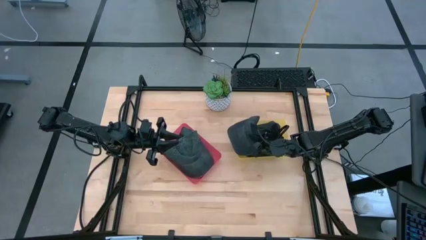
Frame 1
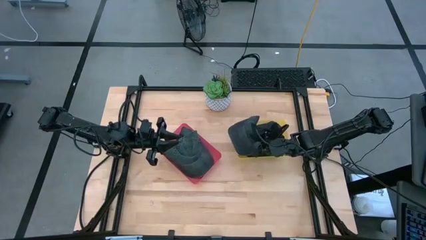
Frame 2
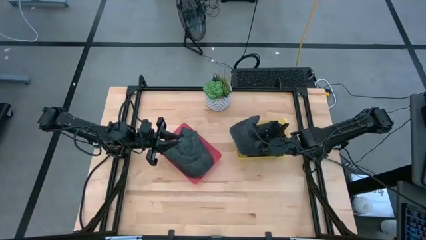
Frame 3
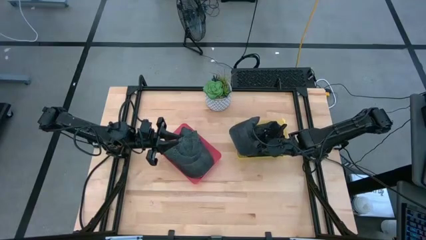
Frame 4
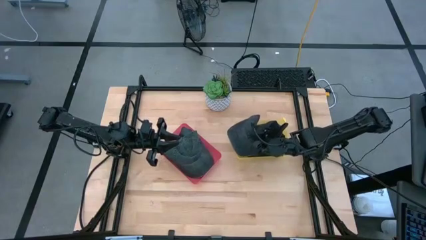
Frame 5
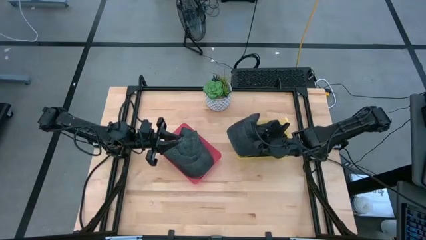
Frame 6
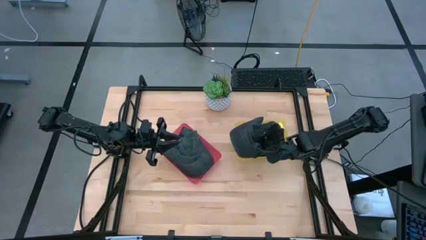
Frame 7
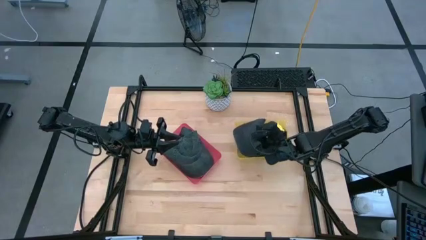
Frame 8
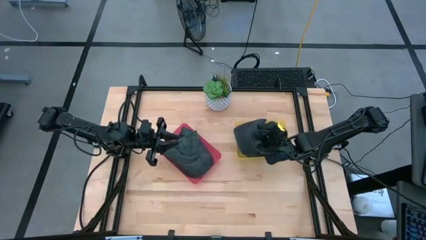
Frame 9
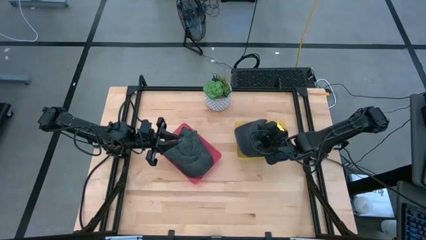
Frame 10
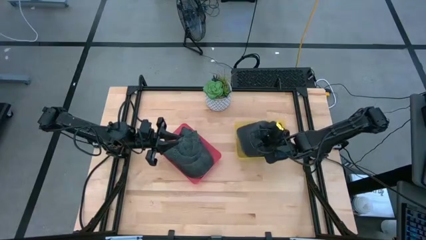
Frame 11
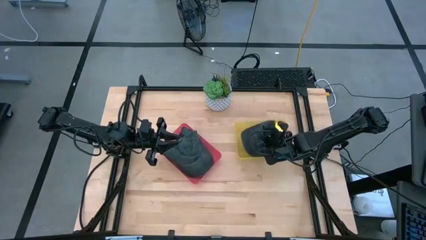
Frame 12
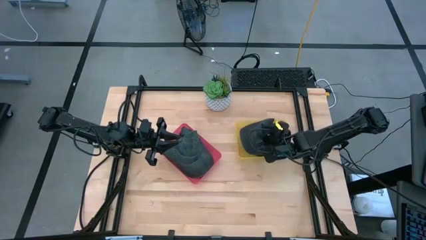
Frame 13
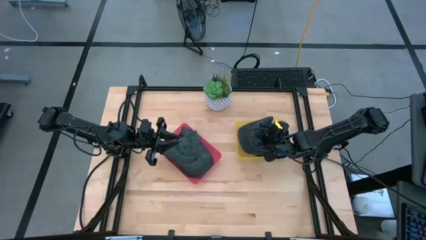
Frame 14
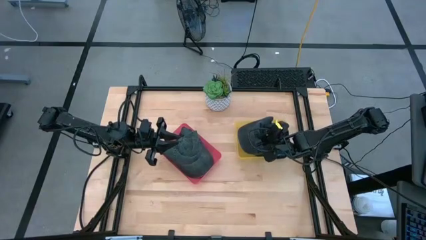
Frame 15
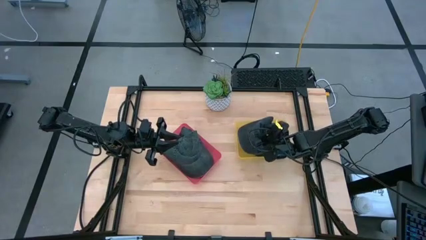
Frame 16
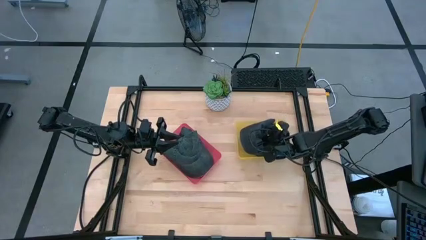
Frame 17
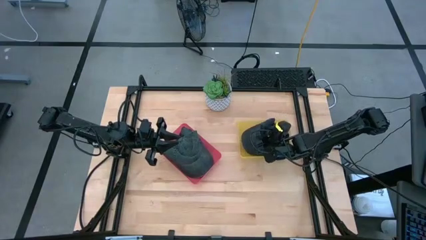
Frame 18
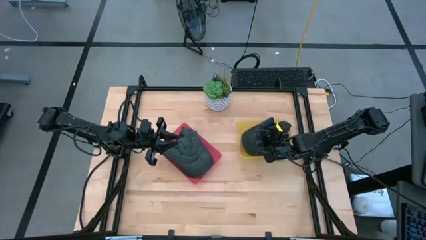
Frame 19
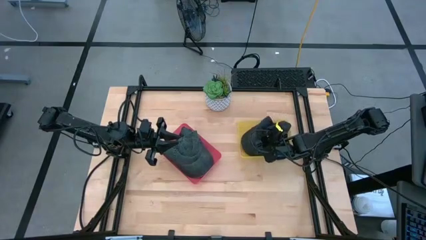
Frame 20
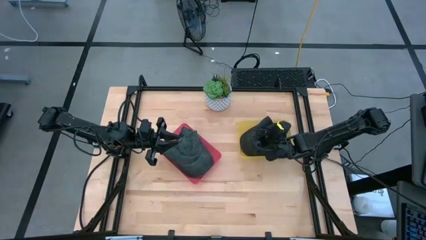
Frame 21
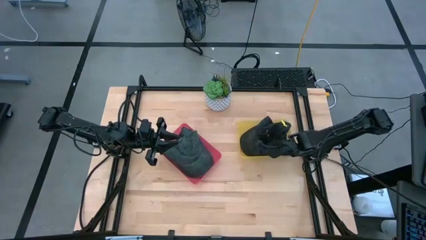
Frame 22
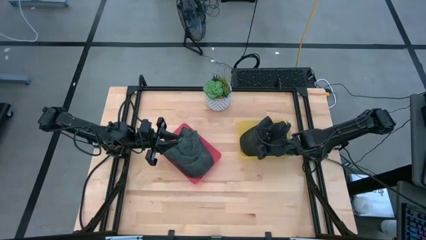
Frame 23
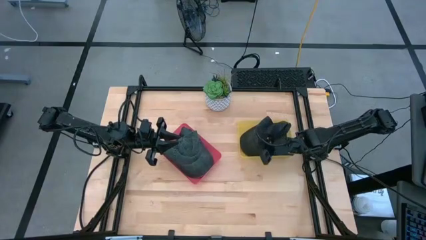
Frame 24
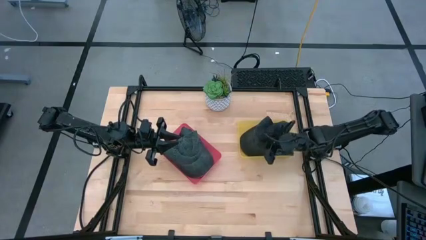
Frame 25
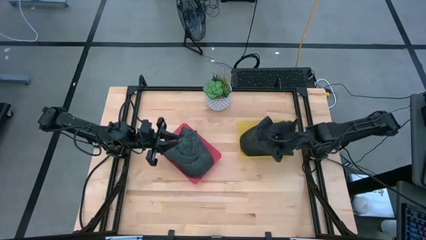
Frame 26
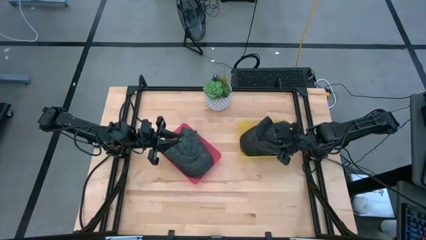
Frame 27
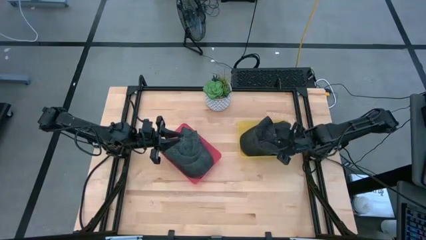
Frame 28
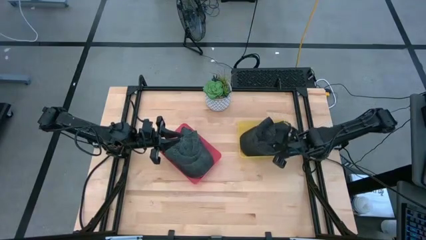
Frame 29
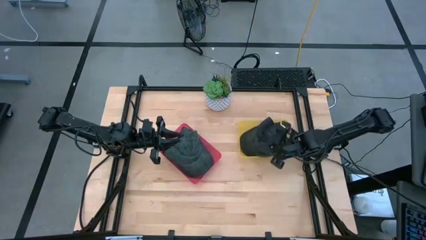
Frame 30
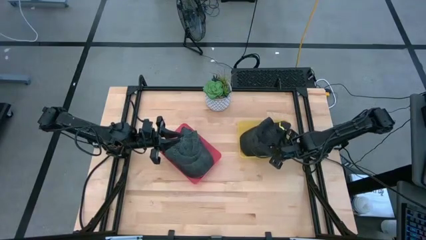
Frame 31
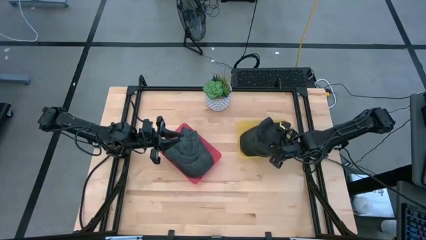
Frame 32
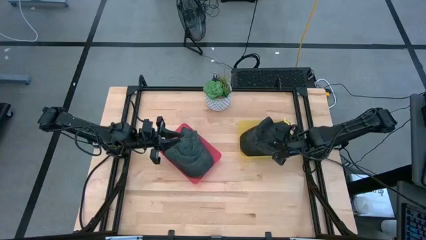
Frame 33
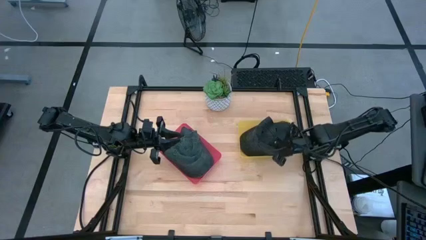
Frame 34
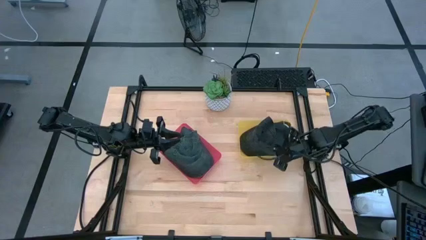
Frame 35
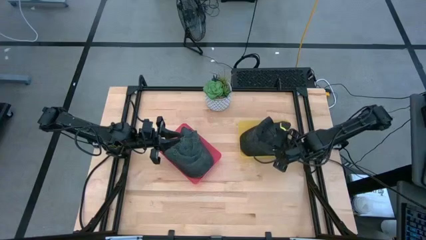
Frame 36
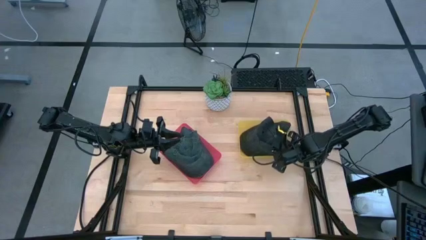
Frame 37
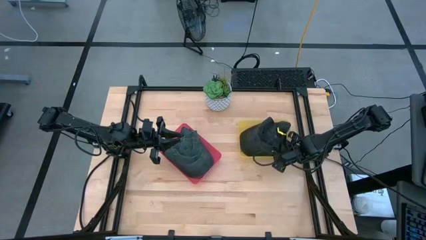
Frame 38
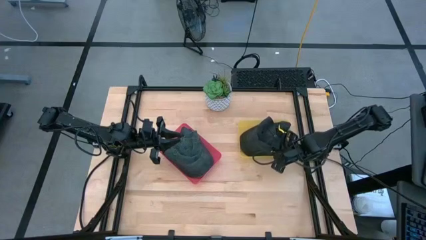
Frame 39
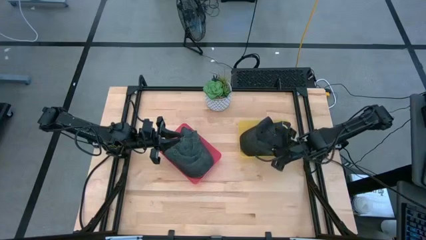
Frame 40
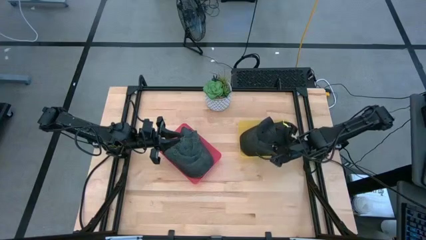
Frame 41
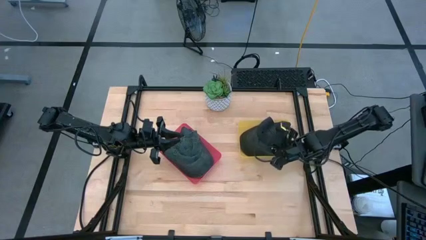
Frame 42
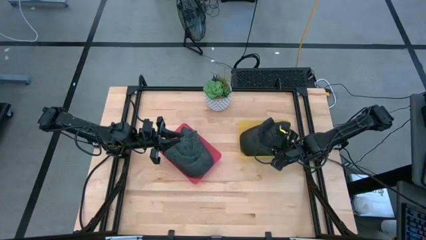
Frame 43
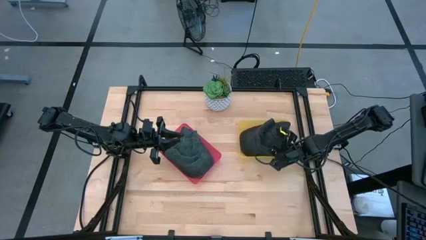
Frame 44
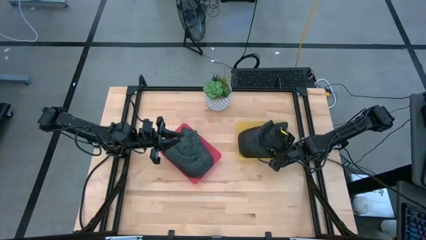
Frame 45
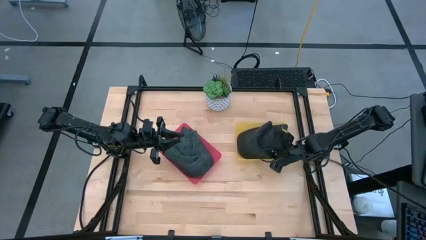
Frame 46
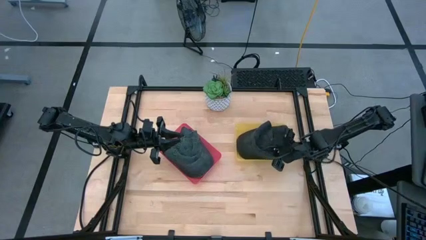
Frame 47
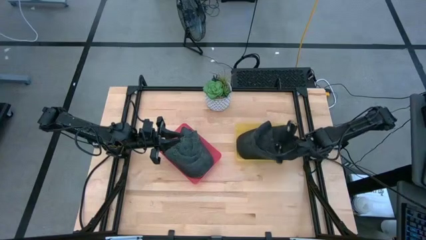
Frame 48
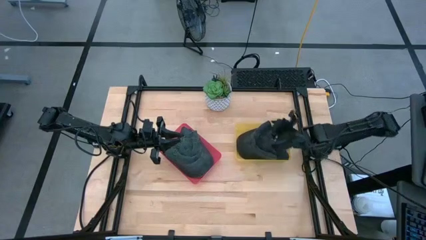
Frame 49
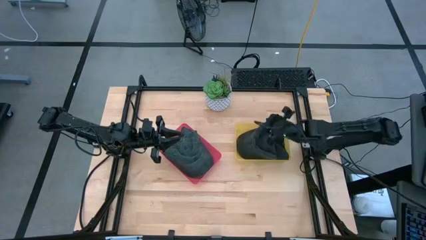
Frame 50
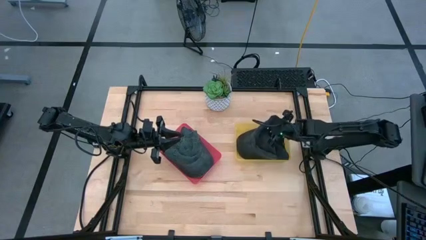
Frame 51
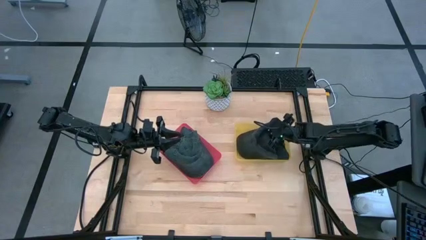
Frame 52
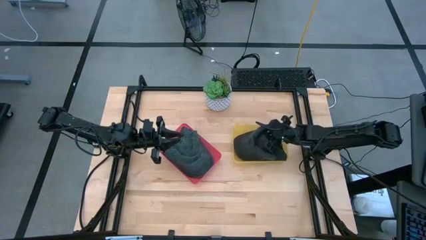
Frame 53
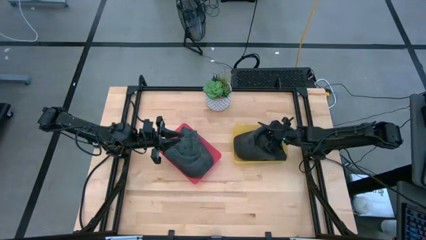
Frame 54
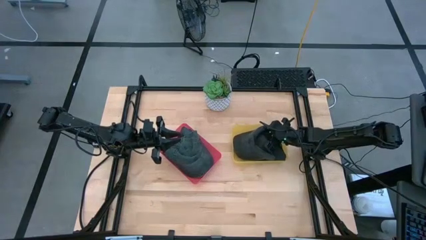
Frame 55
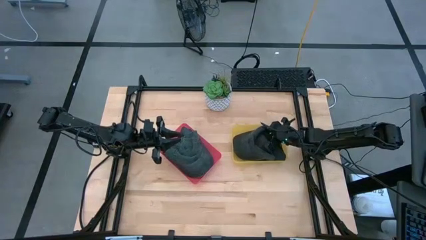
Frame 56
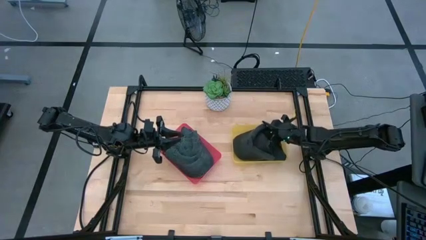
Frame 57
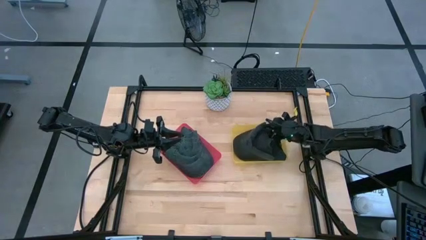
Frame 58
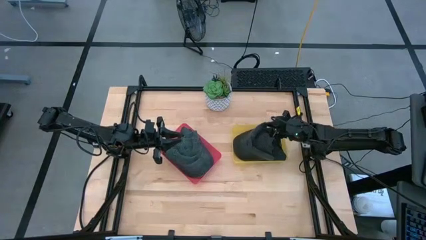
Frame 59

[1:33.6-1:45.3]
Task: Pick & Place hat
Put the black cap into the yellow bin

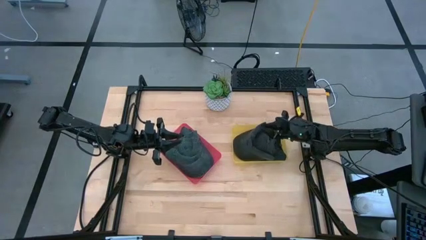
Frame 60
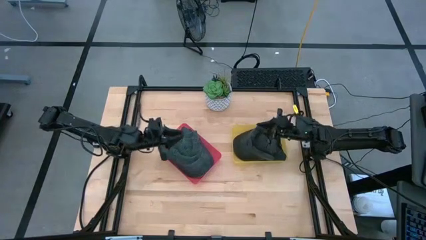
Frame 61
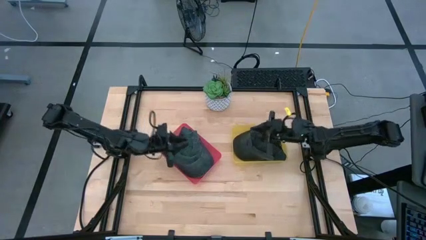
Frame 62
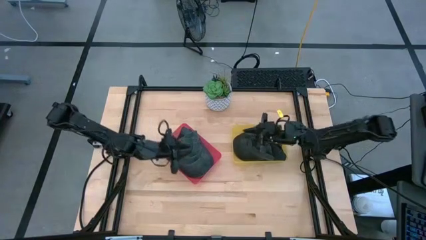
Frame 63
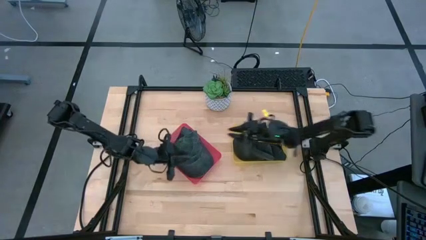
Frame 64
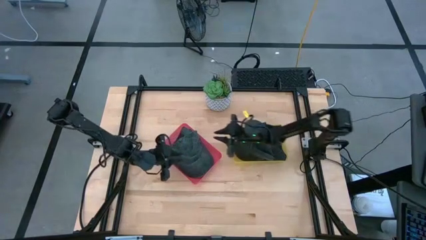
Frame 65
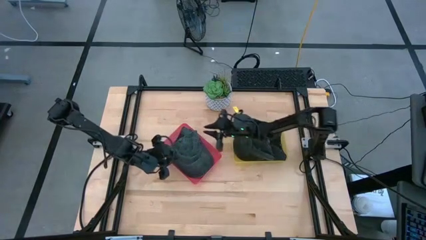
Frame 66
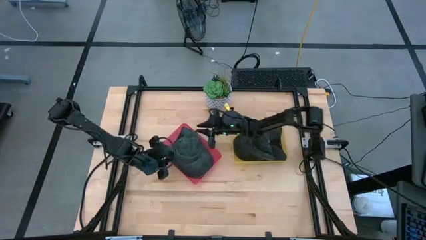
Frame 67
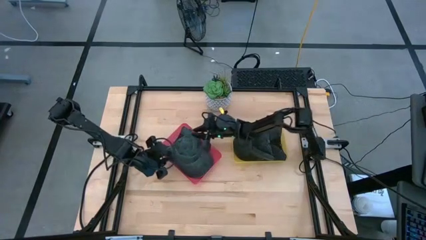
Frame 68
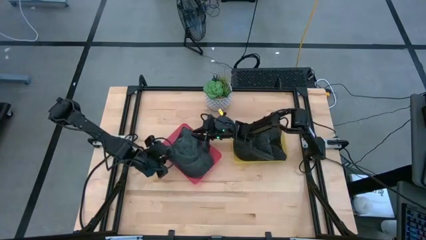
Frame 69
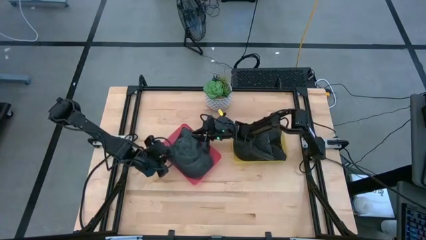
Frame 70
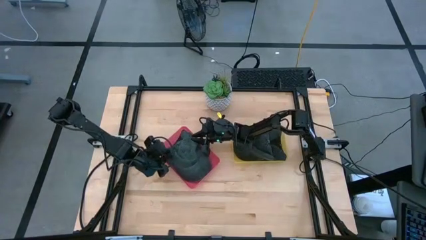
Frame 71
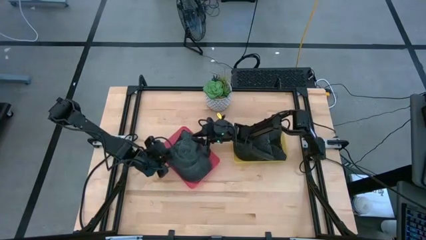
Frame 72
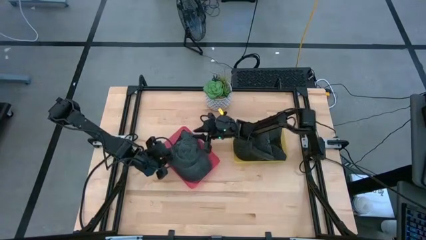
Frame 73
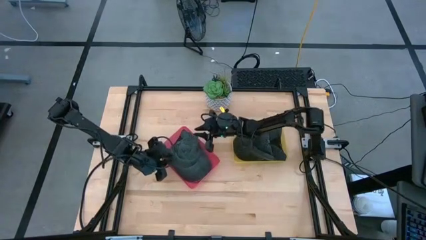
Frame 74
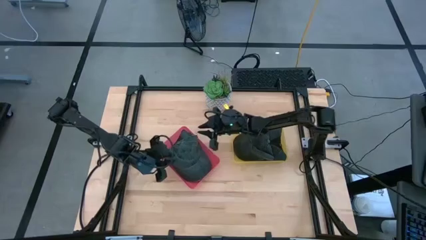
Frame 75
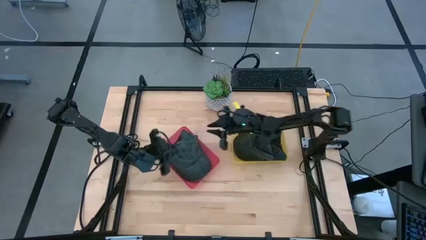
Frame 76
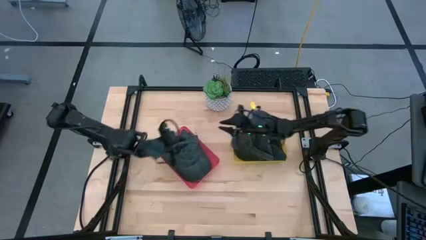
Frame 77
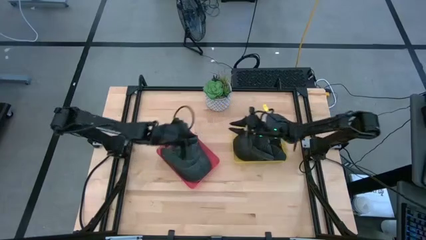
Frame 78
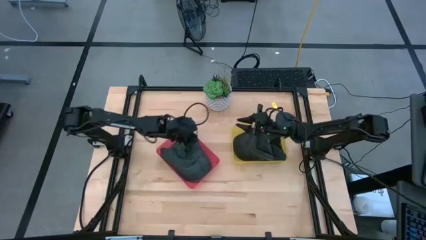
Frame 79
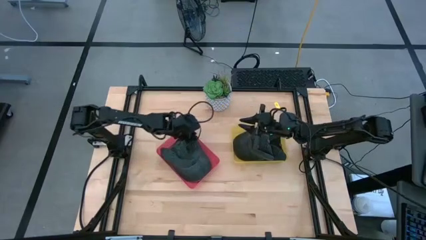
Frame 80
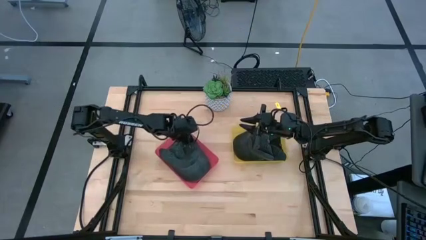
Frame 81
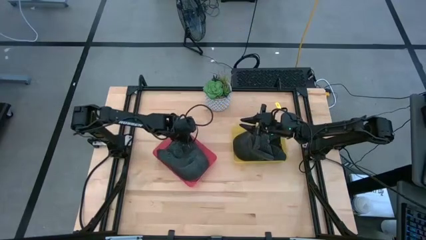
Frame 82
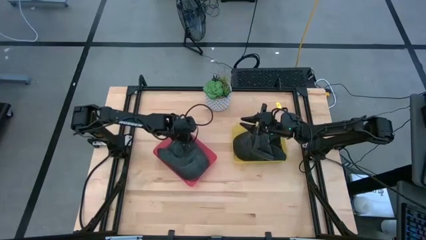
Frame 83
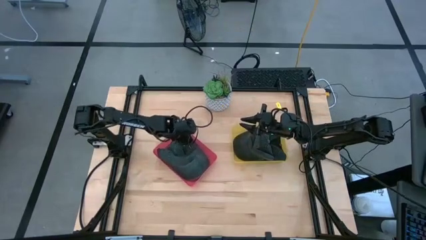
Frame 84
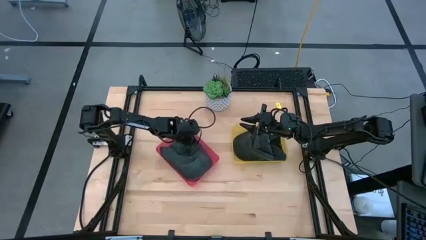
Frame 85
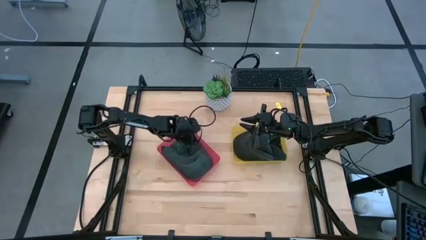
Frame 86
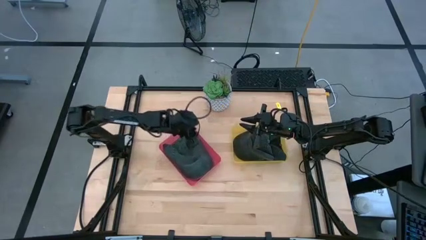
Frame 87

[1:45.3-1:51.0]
Adjust the dark gray cap in the red bin
